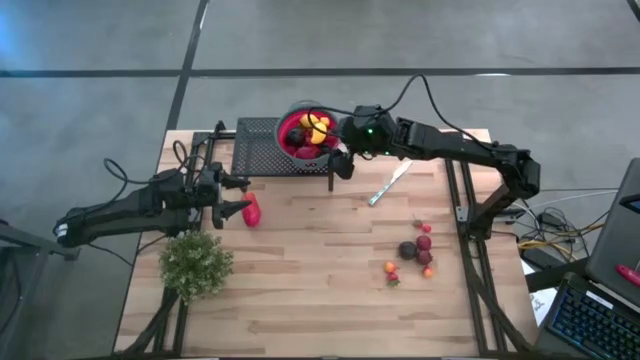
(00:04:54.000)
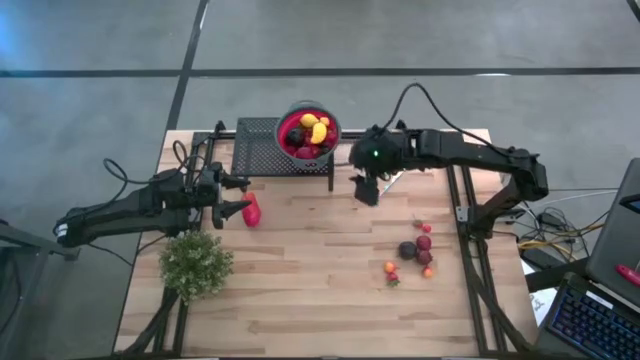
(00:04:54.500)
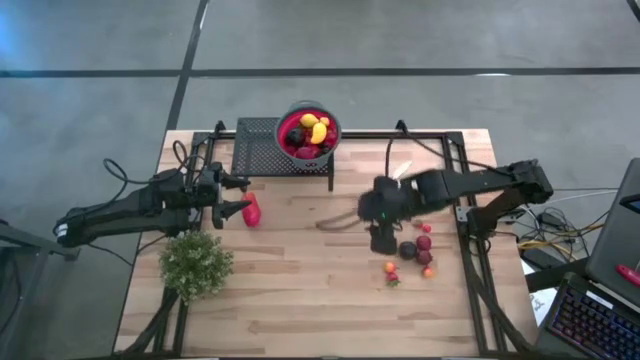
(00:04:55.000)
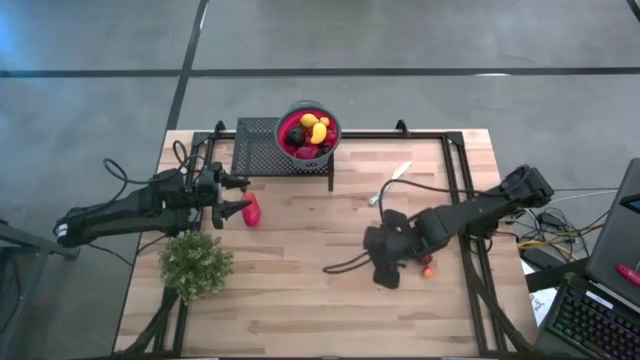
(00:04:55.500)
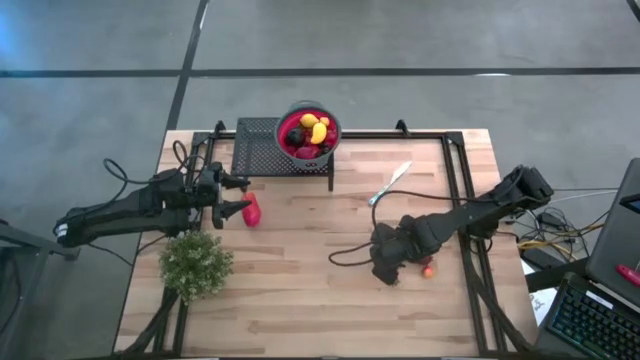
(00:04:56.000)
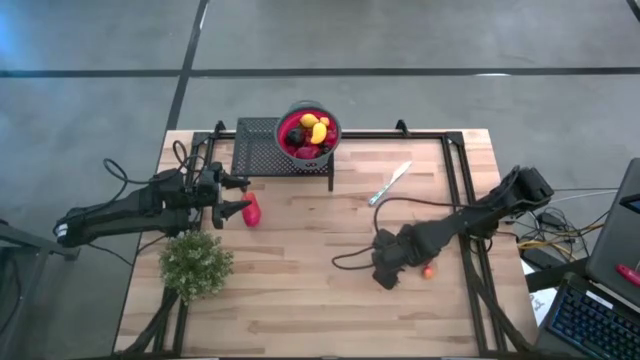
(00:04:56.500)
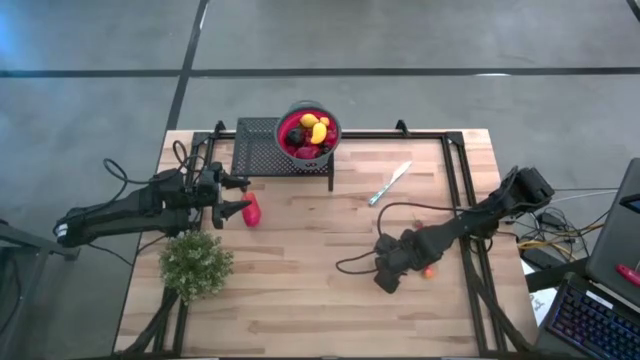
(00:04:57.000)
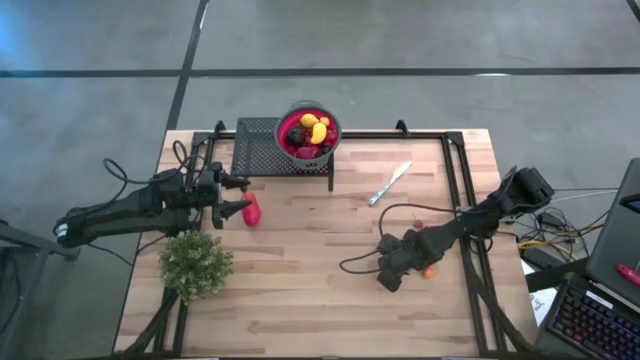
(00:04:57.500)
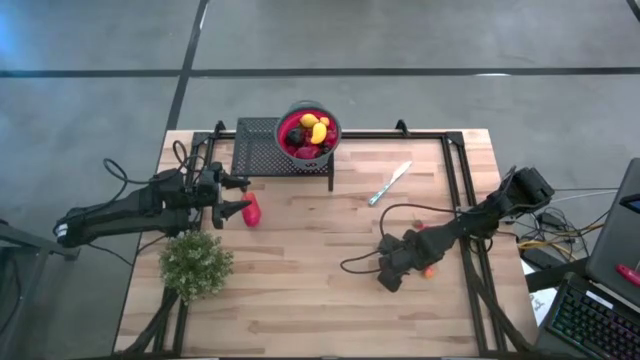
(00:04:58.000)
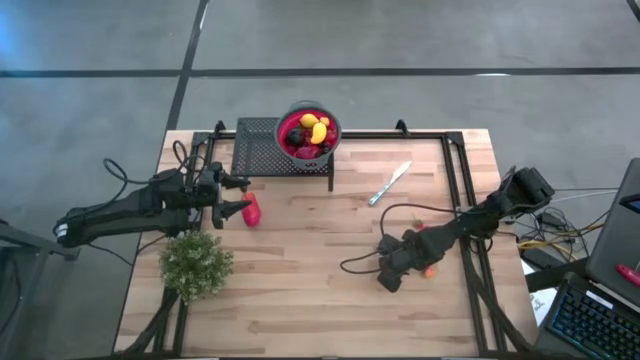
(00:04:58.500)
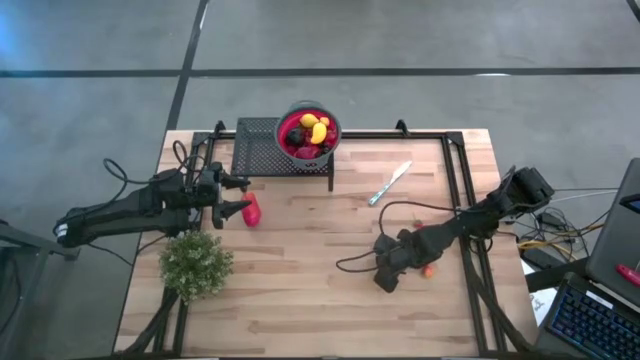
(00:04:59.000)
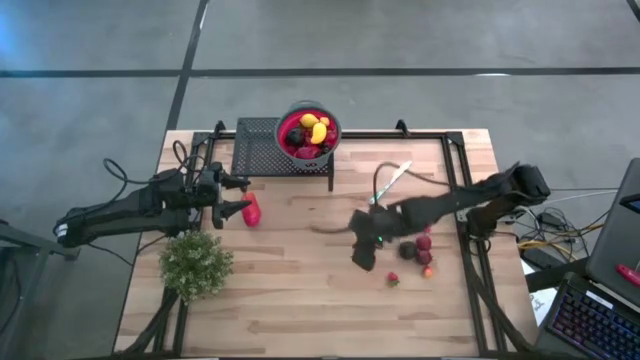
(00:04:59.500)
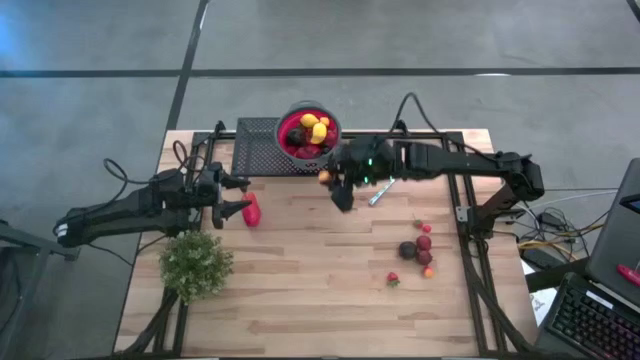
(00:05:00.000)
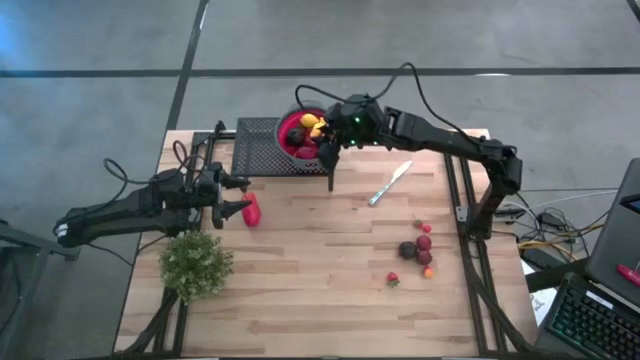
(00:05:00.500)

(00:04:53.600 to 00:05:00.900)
Task: Pick & Place Fruit
Put the orange pear into the red gray strainer bowl on the shelf

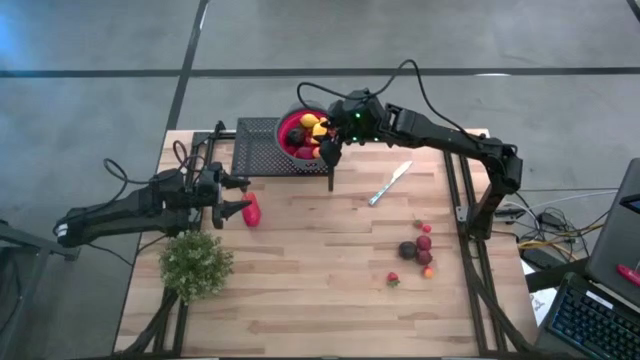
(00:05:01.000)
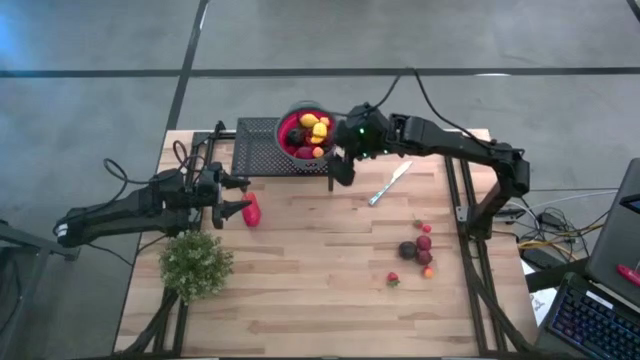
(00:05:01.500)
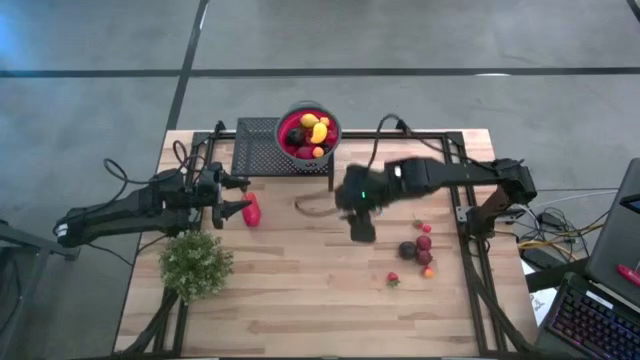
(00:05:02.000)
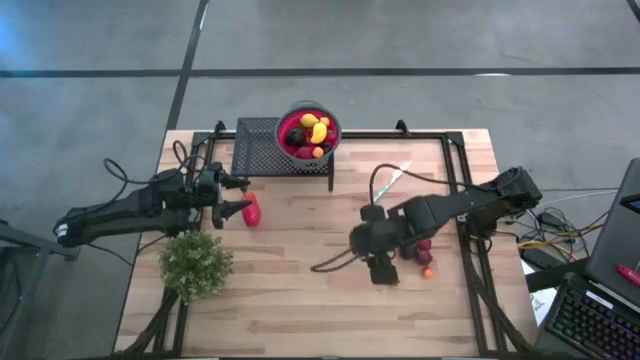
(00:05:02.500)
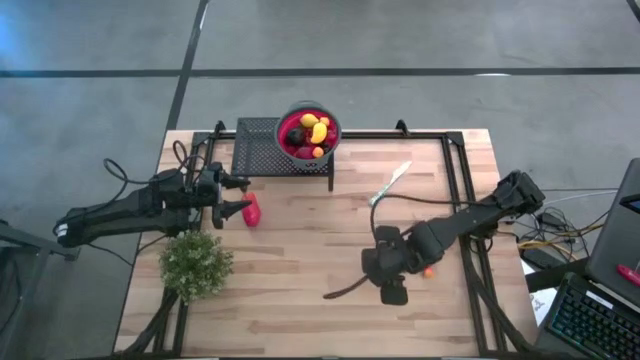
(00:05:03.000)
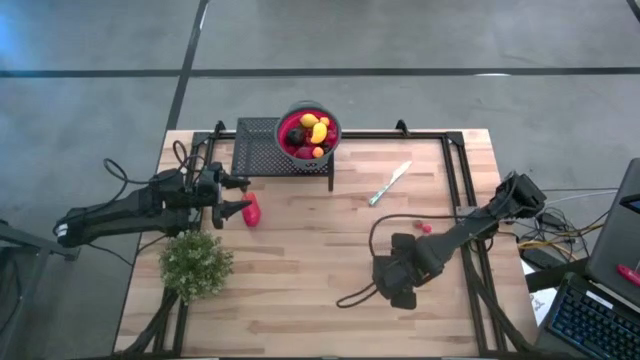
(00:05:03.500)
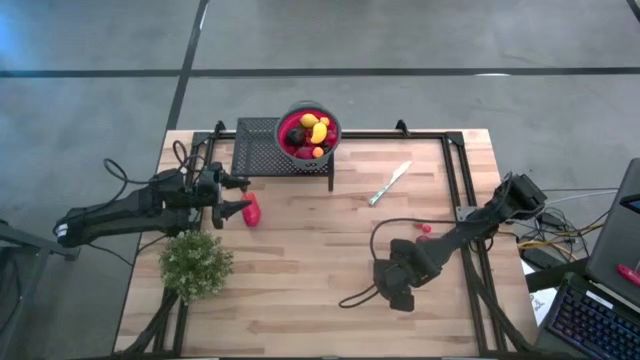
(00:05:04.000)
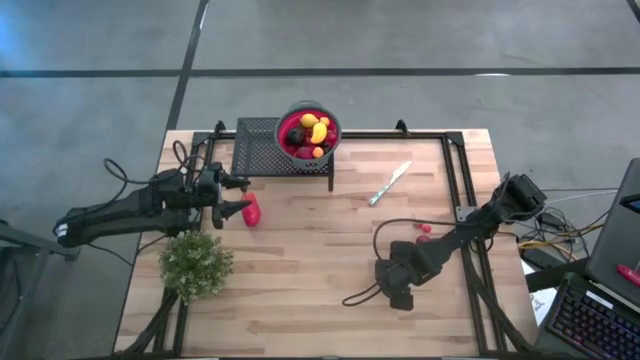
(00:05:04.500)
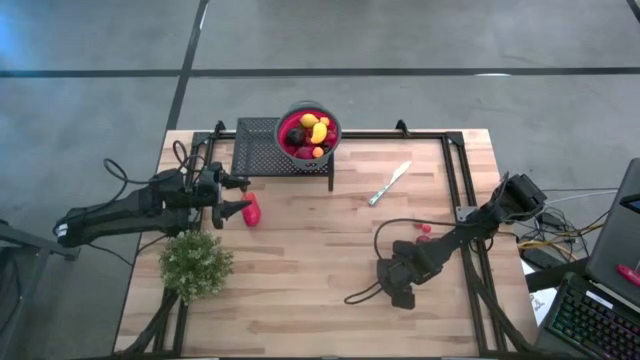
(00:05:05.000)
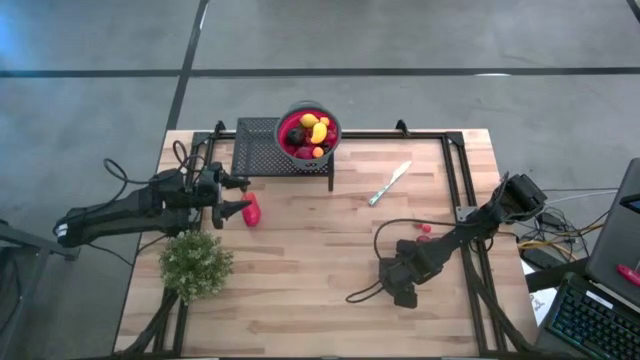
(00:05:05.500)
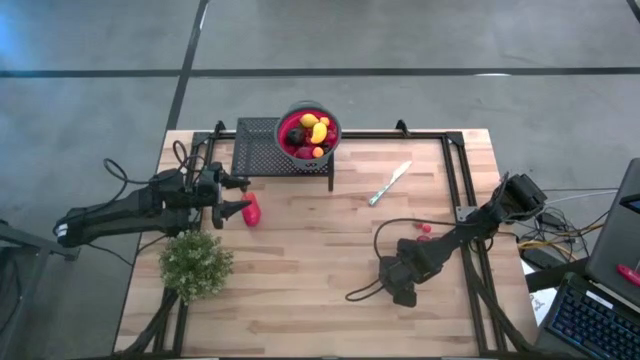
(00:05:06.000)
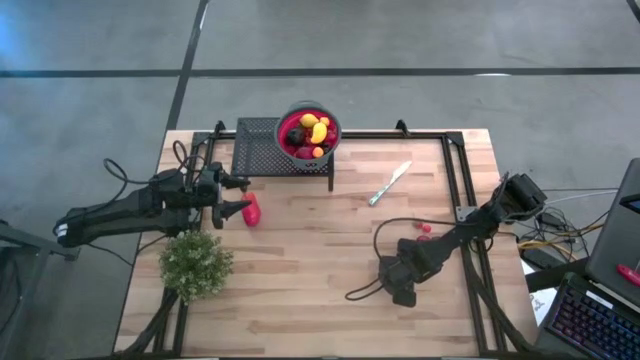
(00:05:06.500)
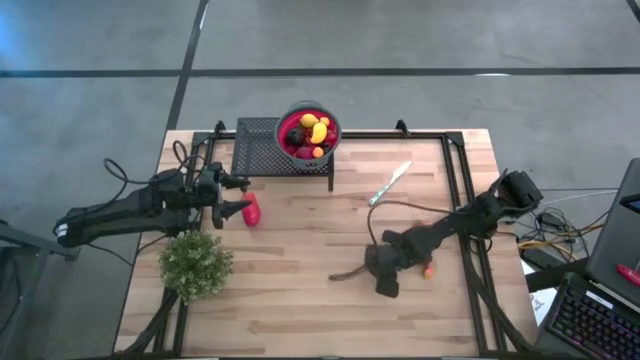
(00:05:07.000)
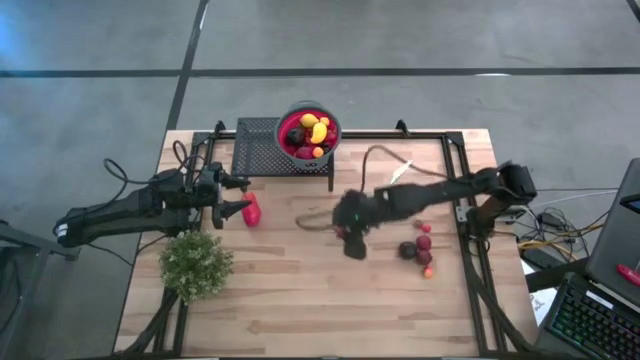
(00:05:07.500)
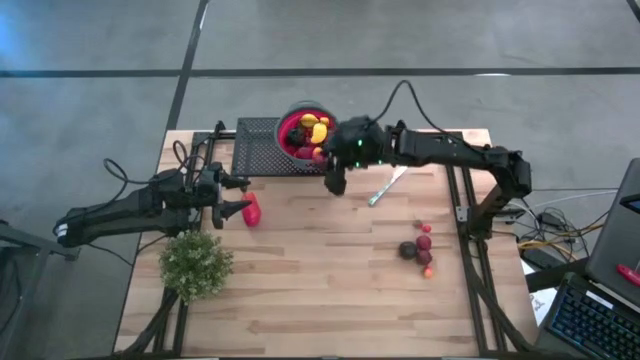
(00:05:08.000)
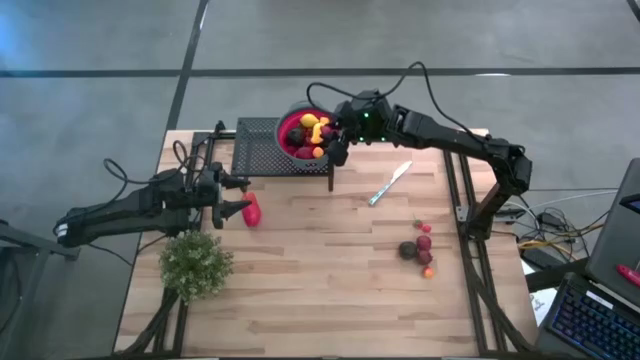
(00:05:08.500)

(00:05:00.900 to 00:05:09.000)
Put the red strawberry into the red gray strainer bowl on the shelf

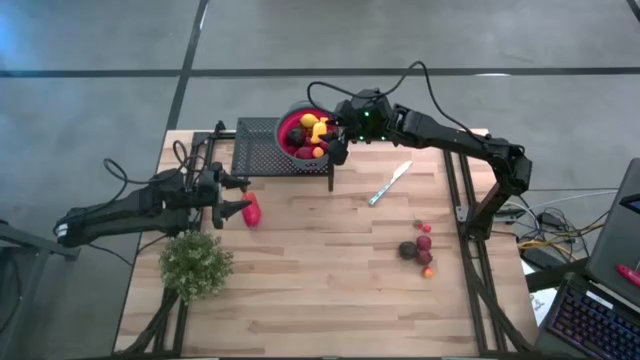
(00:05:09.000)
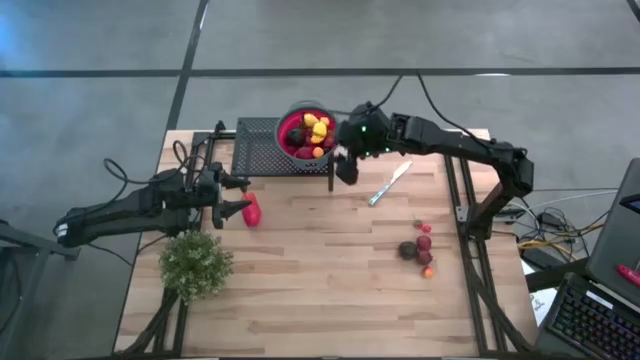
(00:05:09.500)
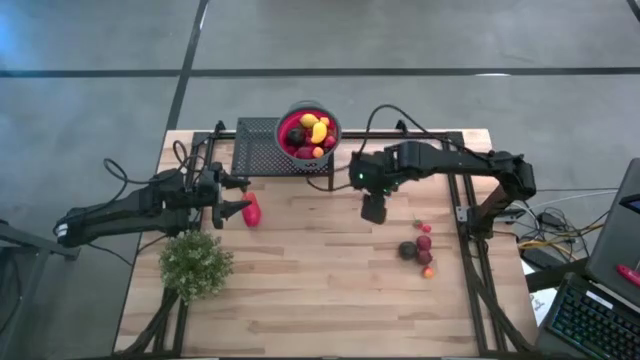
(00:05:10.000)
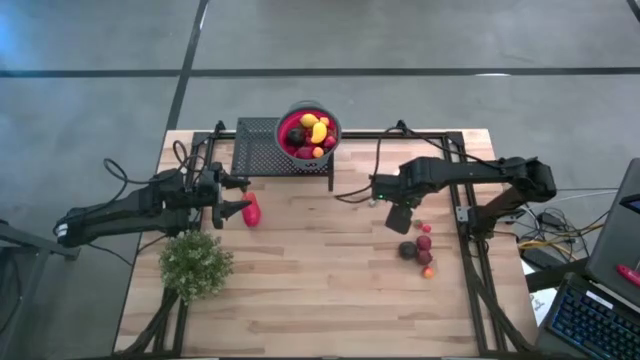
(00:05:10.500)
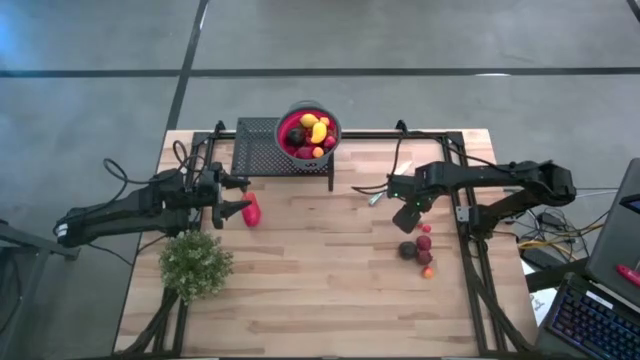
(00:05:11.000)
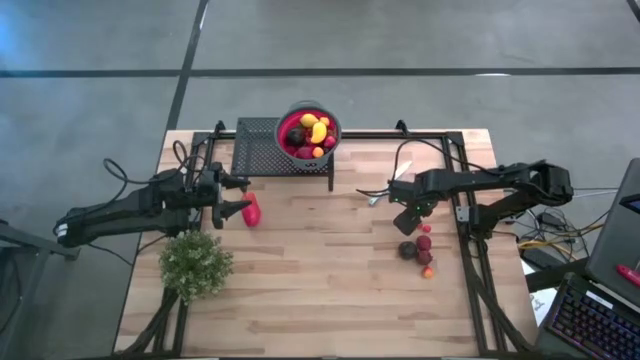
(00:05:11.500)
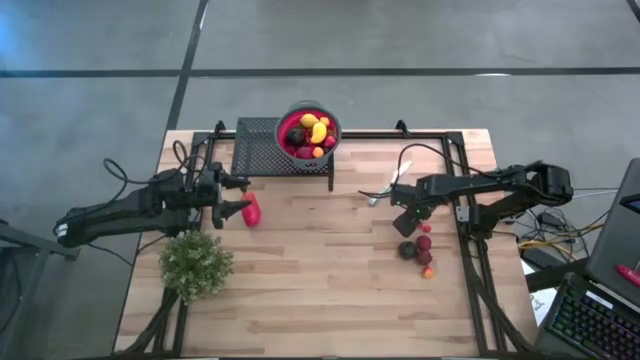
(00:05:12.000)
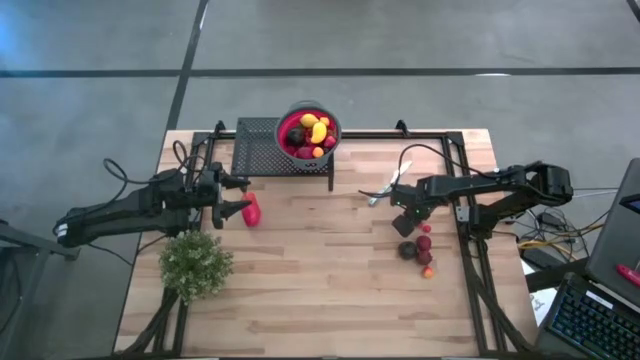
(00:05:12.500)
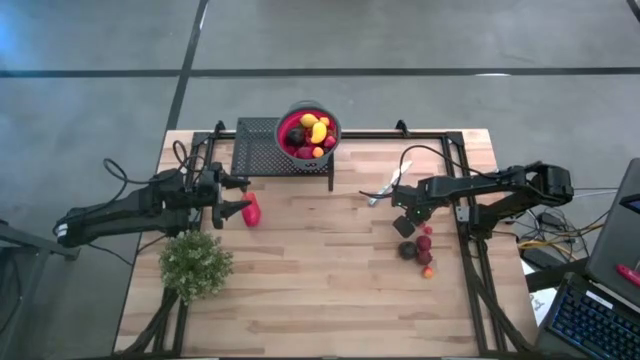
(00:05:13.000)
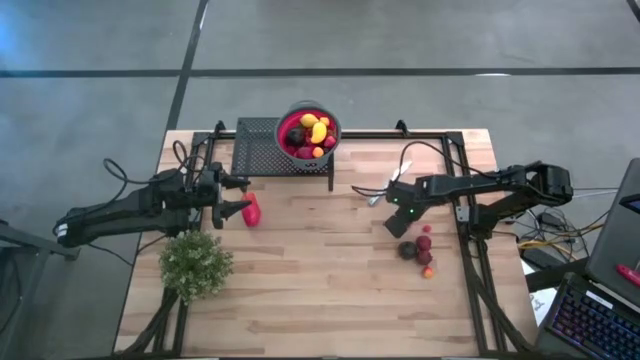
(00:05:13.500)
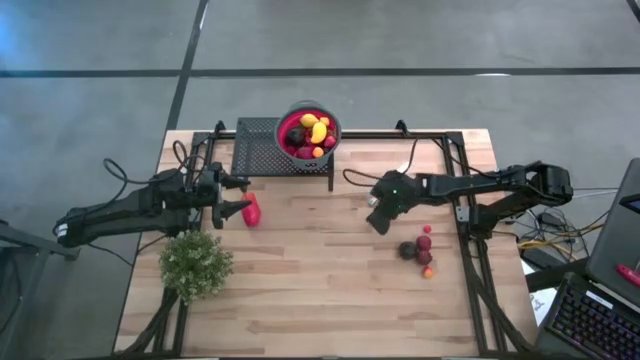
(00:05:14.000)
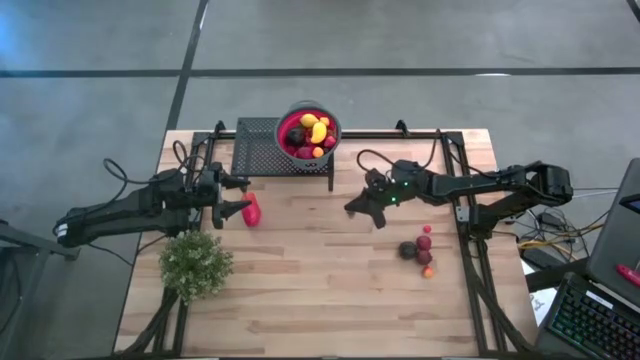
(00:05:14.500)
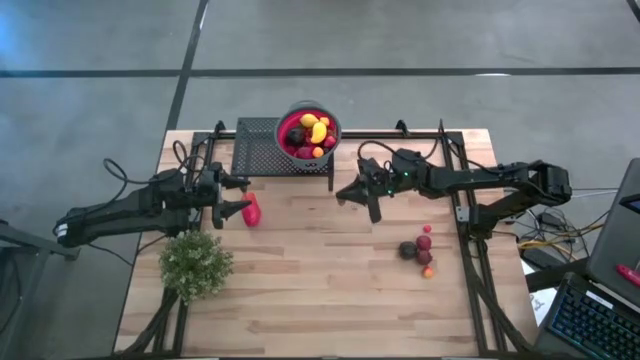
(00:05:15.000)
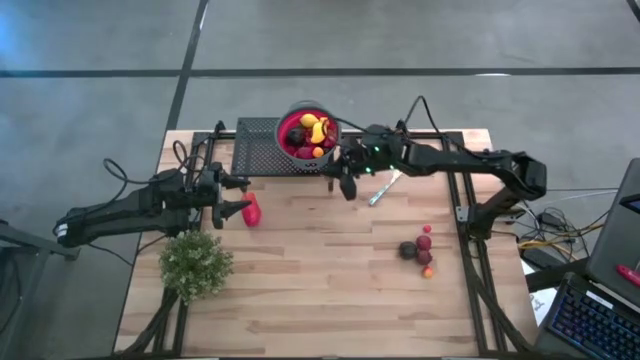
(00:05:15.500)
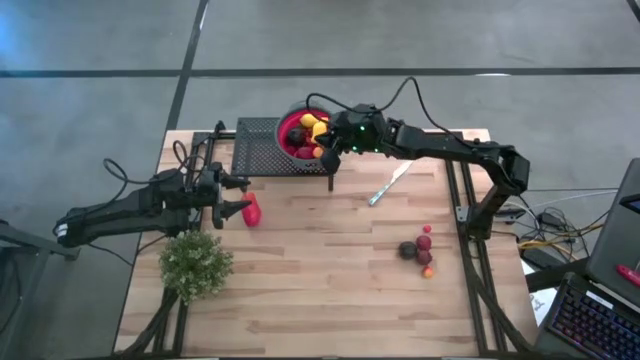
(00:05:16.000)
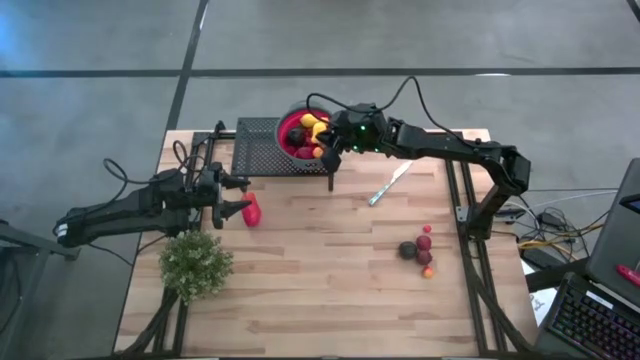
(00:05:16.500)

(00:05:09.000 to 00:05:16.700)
Put the red strawberry into the red gray strainer bowl on the shelf
